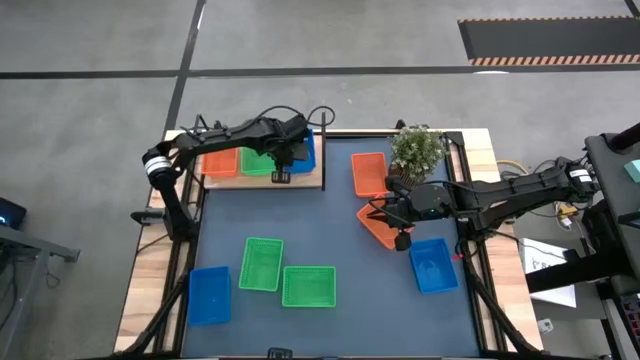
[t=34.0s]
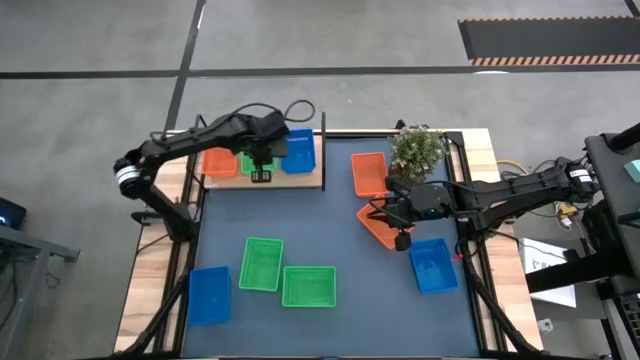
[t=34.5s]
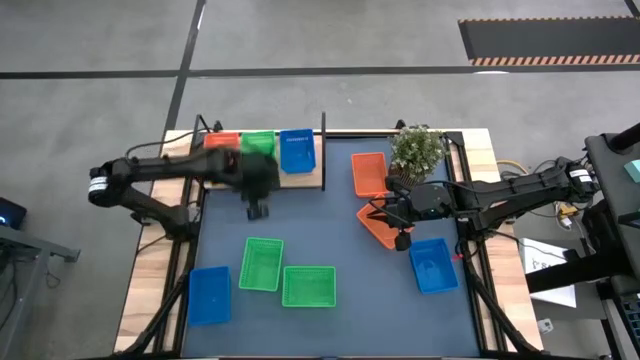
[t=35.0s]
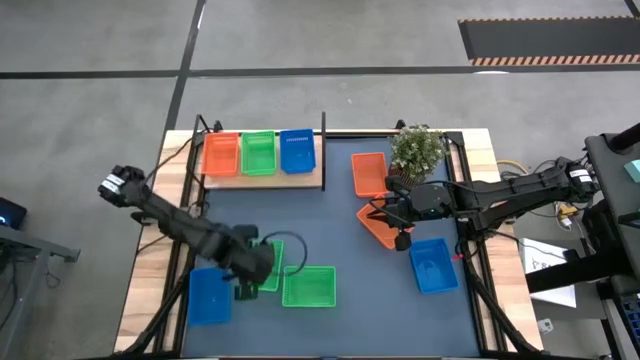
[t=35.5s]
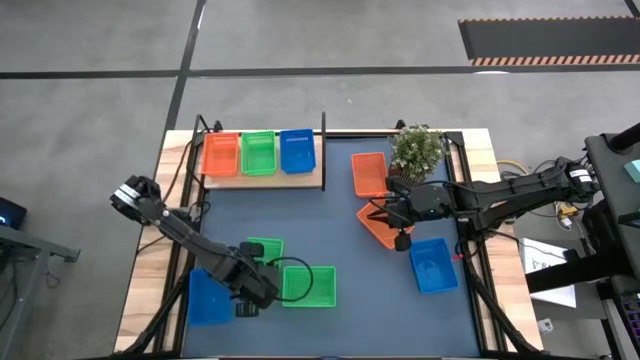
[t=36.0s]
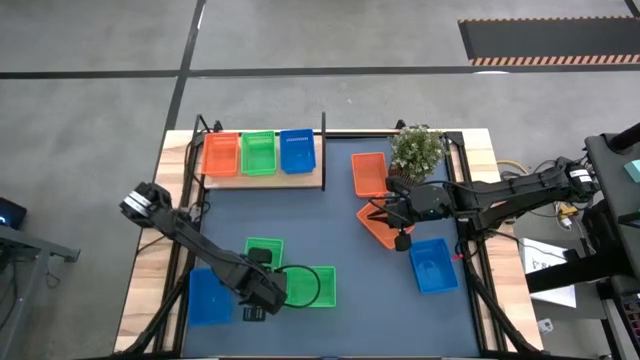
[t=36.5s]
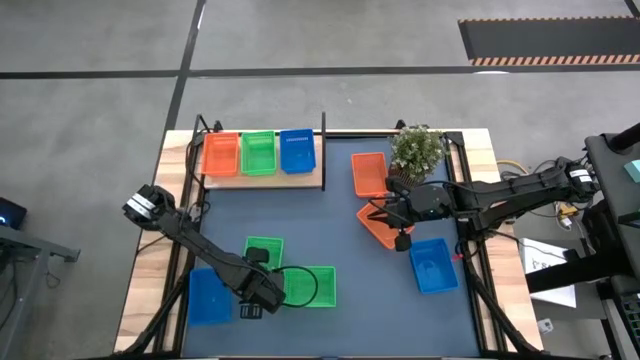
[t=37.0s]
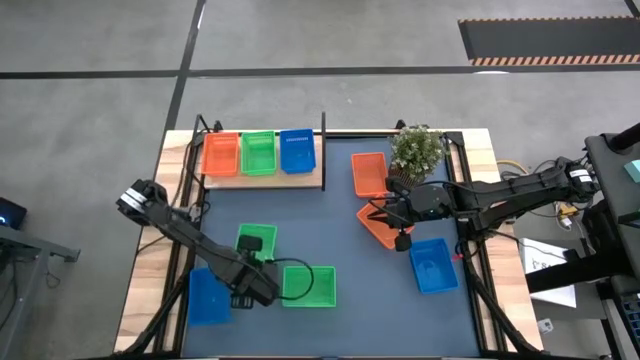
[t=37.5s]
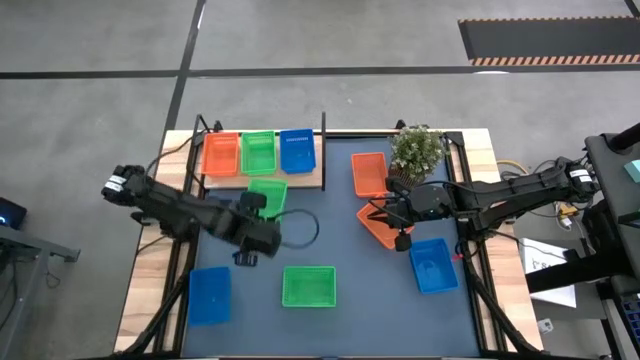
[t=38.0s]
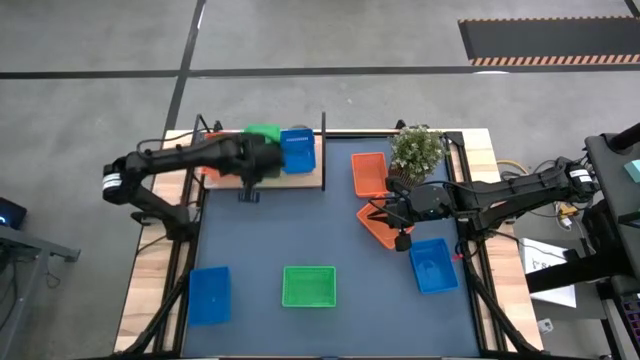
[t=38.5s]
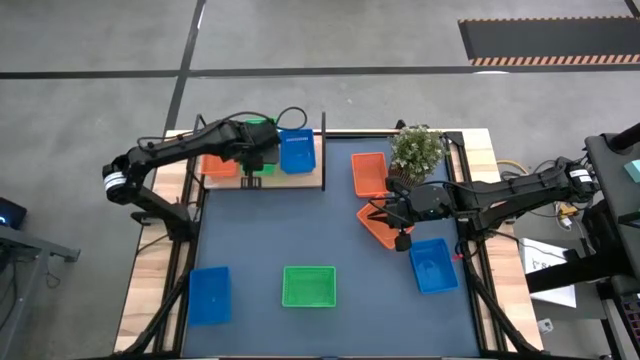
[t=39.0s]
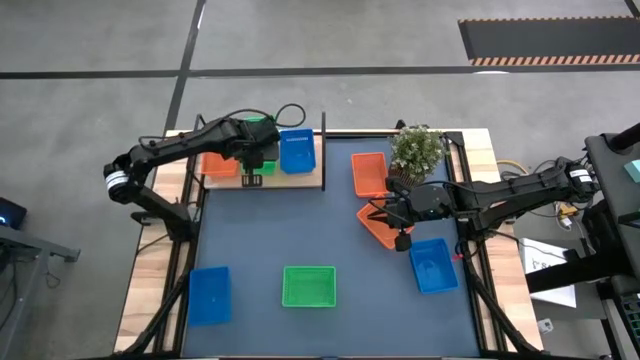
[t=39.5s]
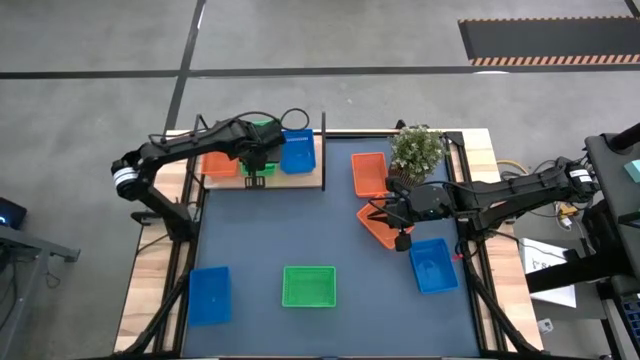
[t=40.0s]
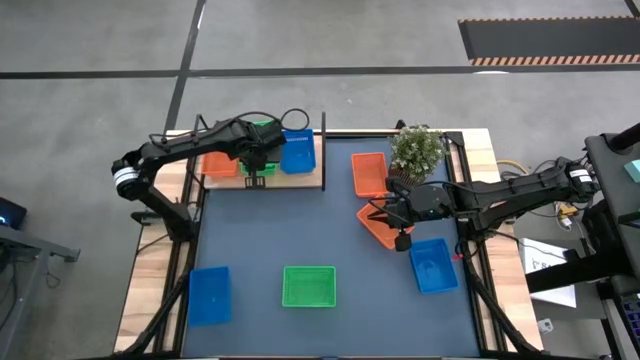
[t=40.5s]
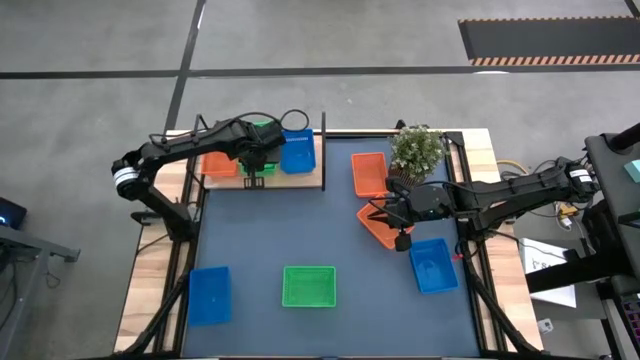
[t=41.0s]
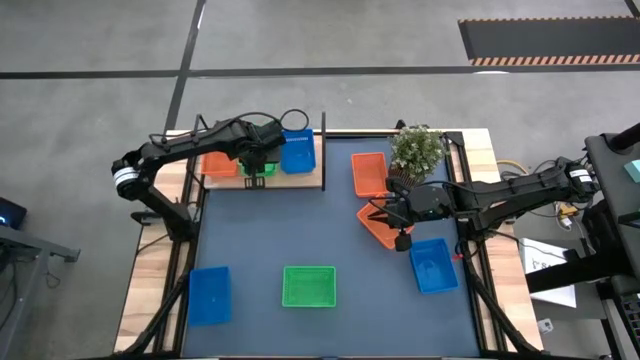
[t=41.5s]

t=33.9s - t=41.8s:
Task: Stack baskets on shelf by color
Stack the top green bin on top of the green bin on the shelf

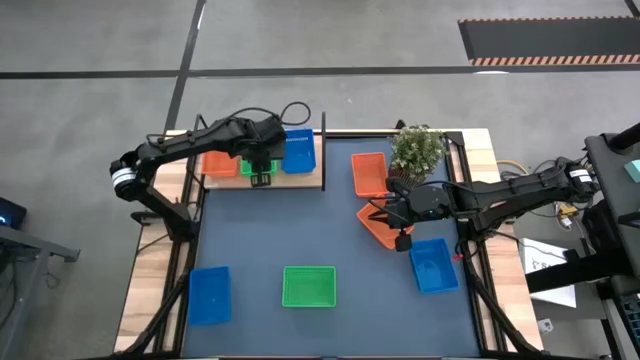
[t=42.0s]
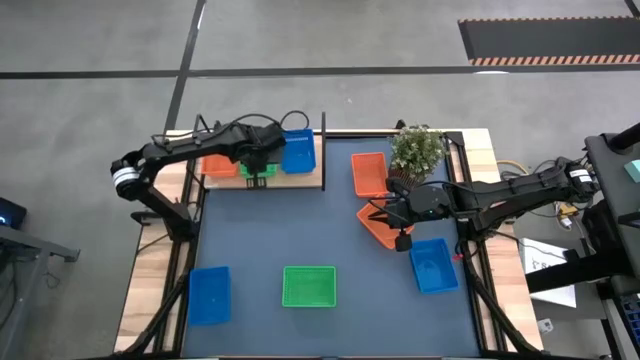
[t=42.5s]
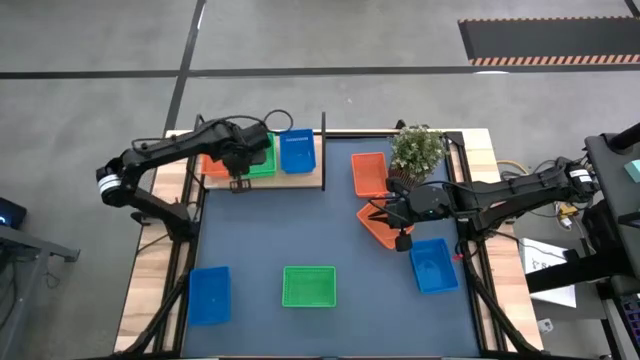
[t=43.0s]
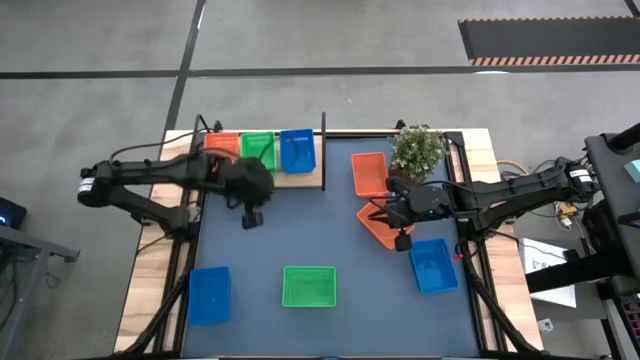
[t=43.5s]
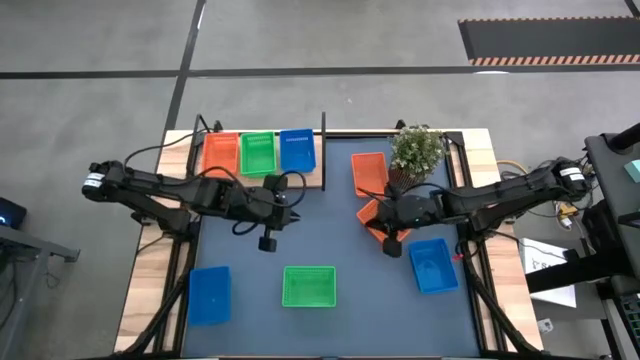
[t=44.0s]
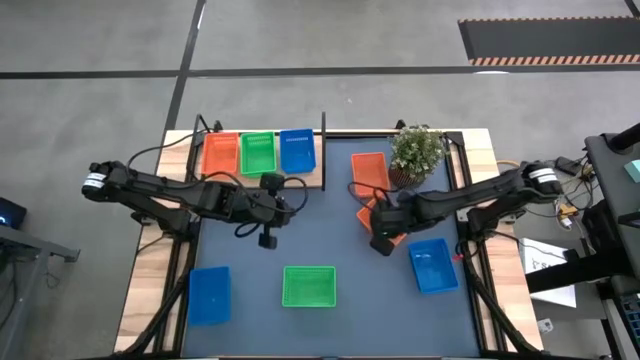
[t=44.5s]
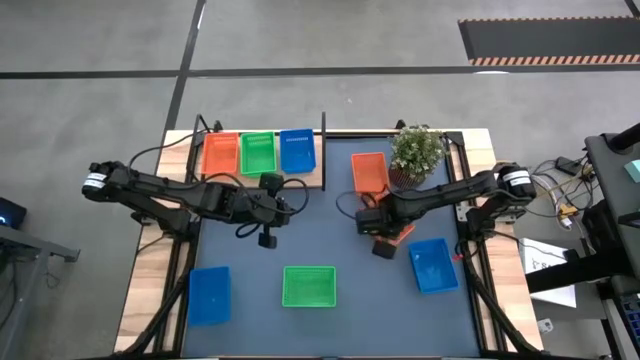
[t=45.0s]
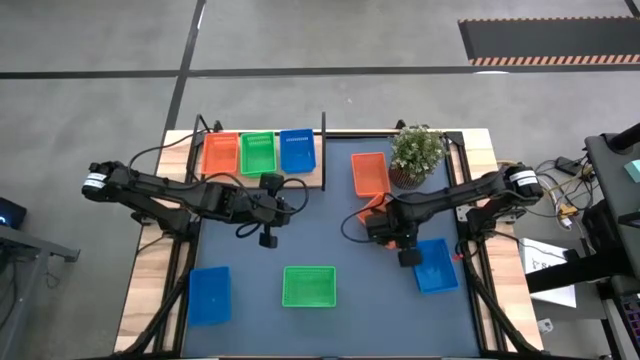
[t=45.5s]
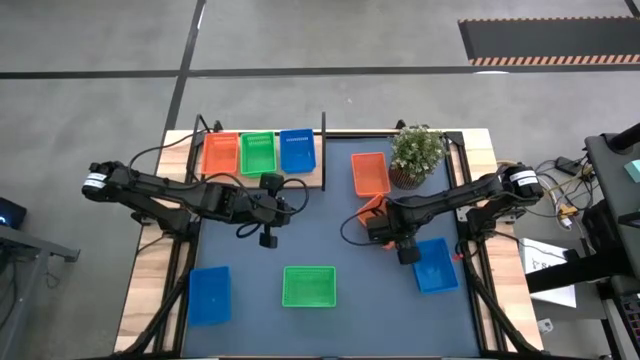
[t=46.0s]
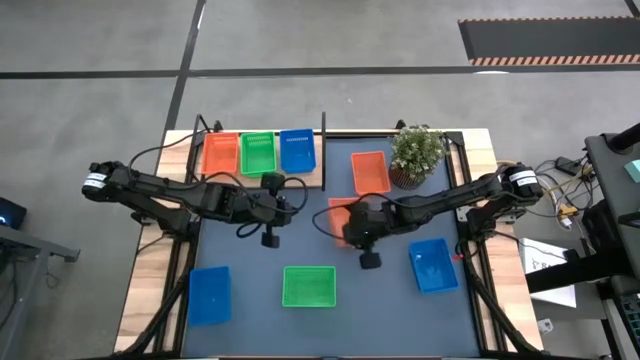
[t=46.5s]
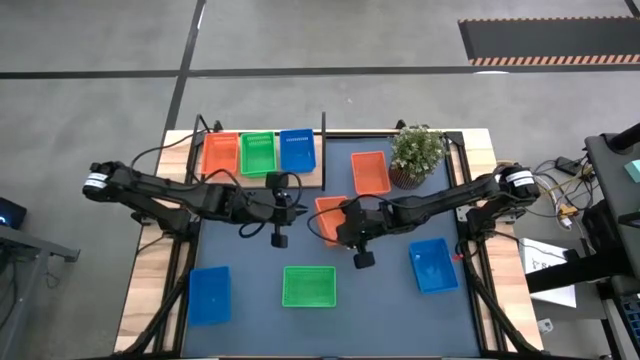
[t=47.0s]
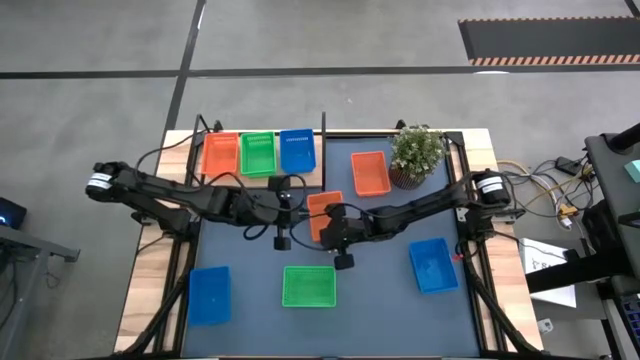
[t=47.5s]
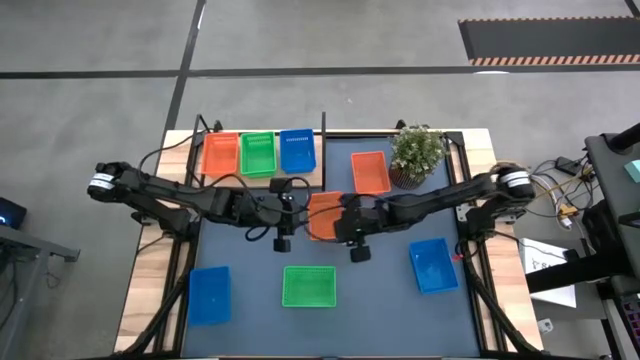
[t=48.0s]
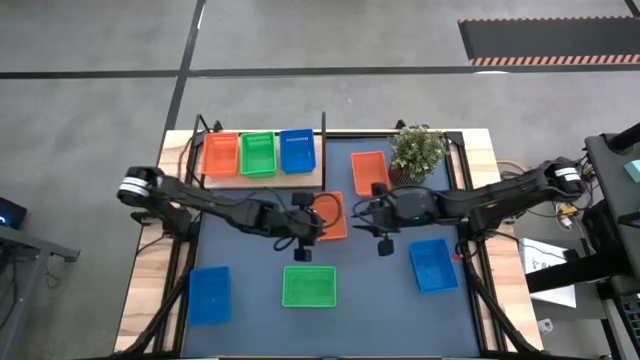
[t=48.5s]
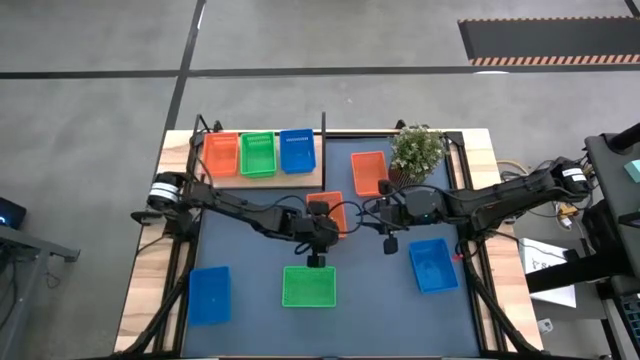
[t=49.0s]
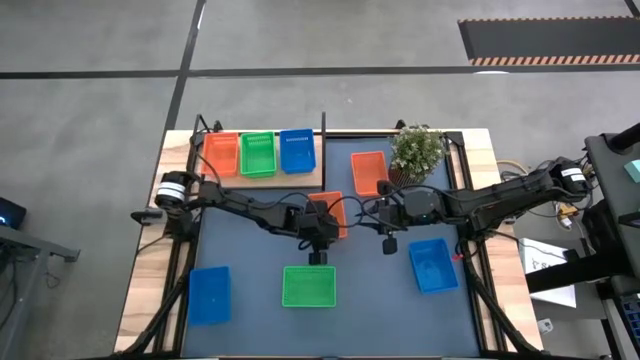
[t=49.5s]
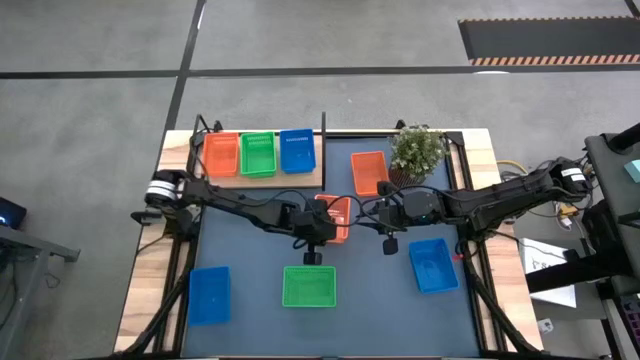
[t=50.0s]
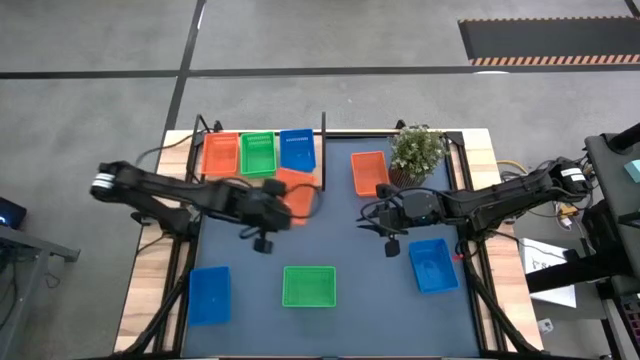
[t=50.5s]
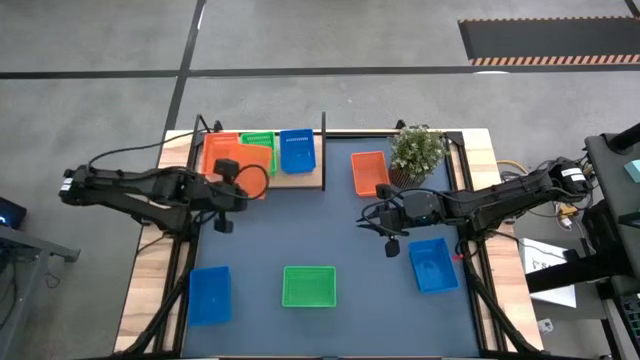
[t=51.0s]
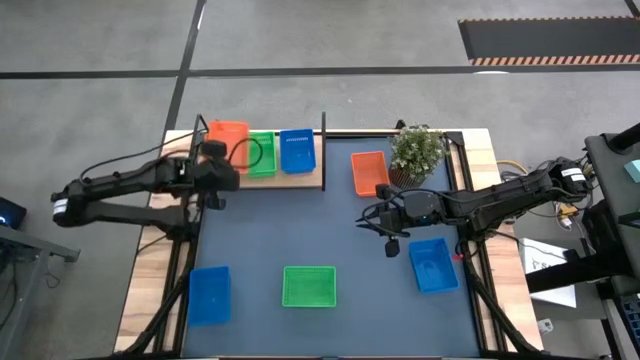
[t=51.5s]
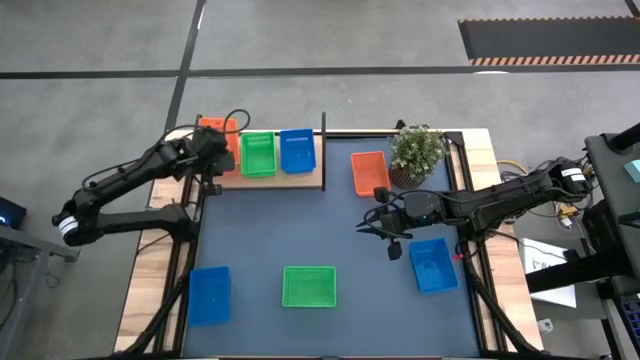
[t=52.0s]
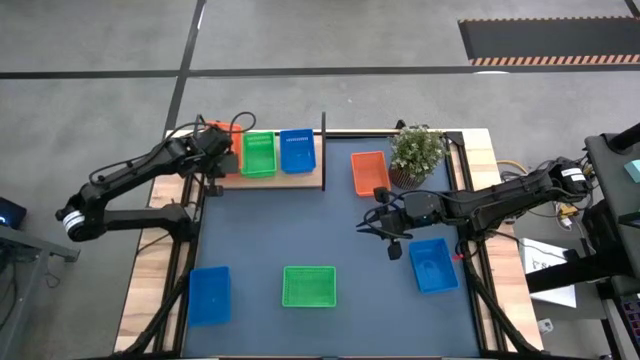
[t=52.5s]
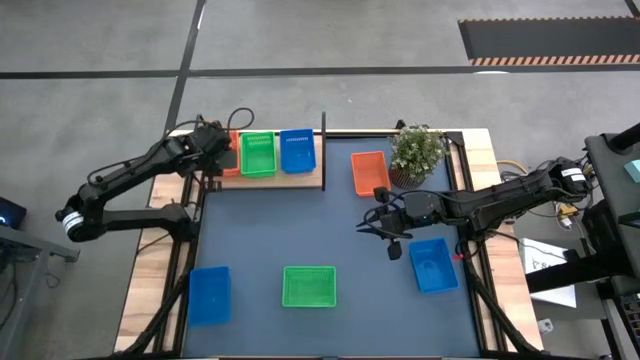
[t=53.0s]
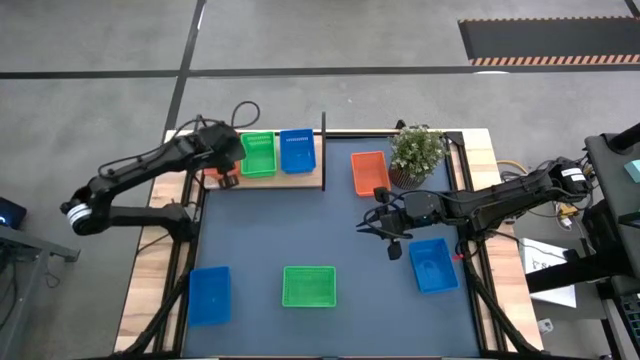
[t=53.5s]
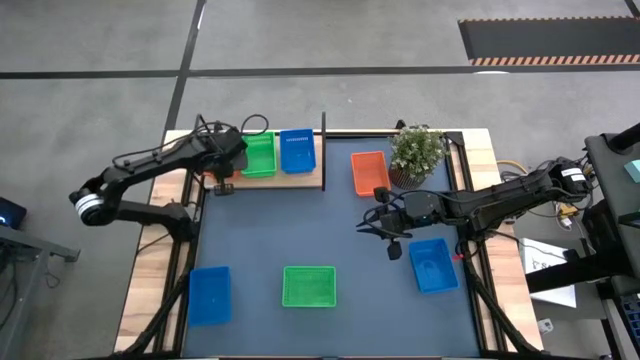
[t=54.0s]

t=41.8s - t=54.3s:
Stack the bottom orange bin on top of the orange bin on the shelf

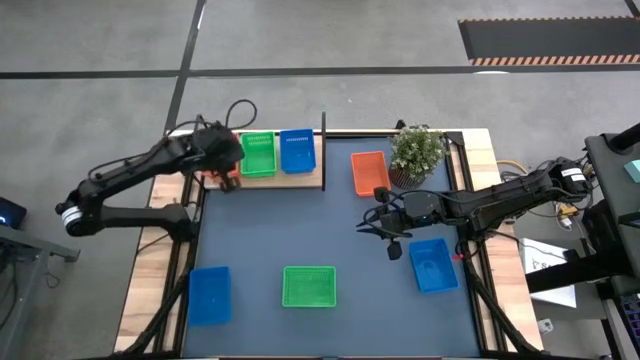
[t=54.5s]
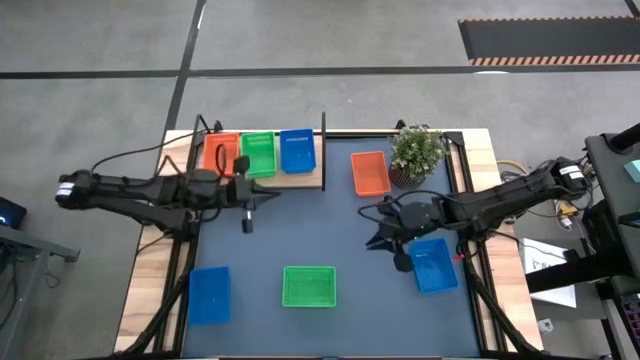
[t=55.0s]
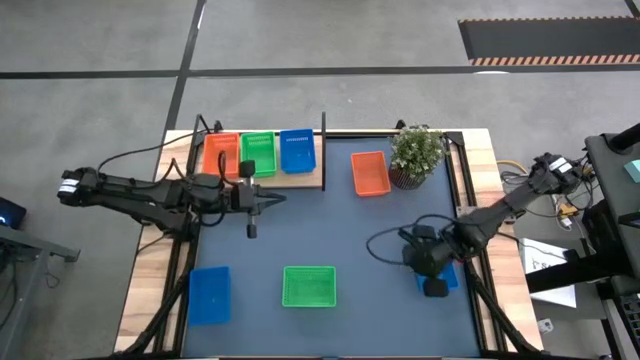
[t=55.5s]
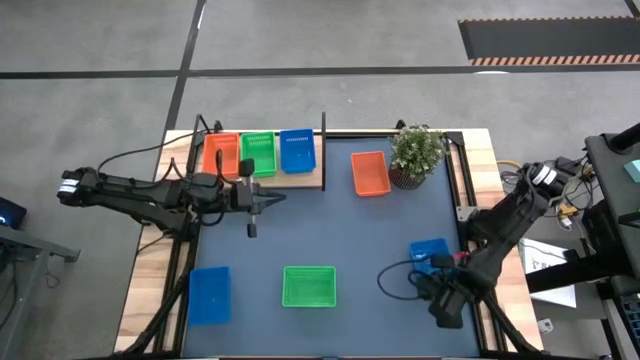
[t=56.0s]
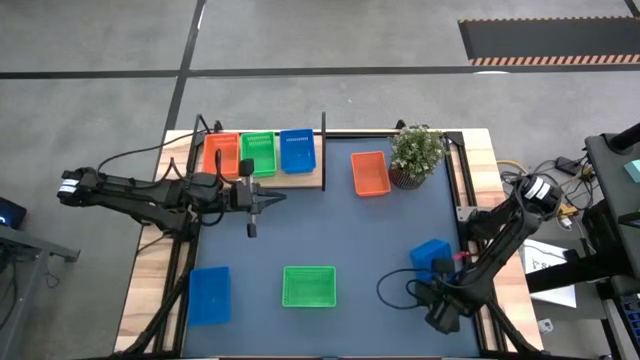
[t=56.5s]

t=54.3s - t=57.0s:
Stack the right blue bin into the blue bin on the shelf
